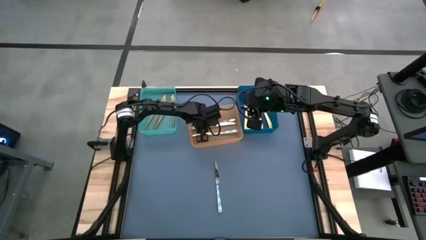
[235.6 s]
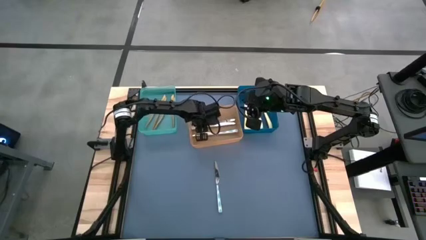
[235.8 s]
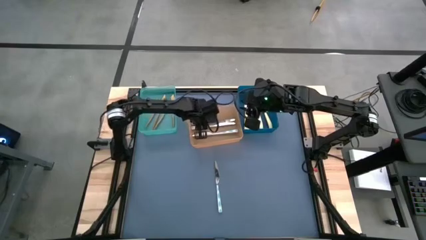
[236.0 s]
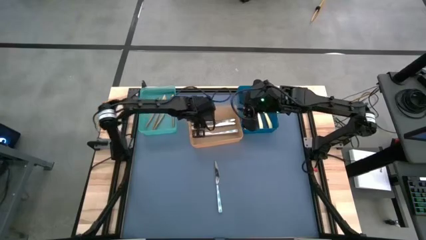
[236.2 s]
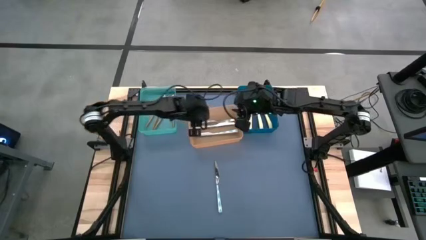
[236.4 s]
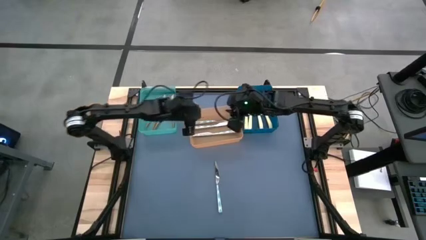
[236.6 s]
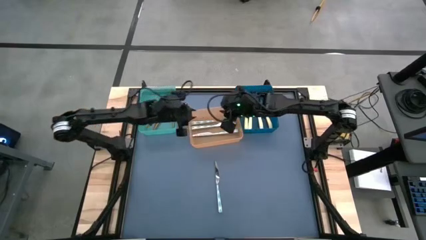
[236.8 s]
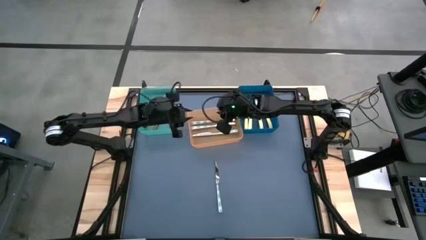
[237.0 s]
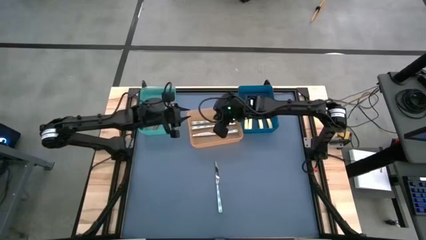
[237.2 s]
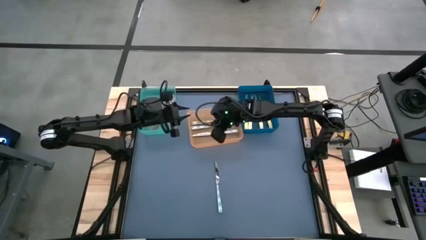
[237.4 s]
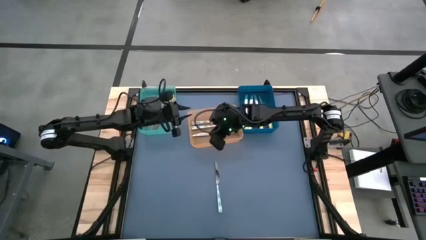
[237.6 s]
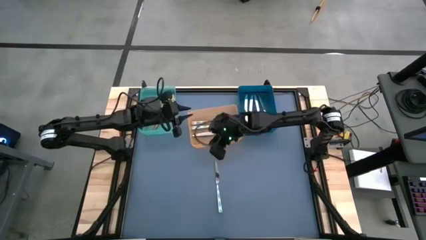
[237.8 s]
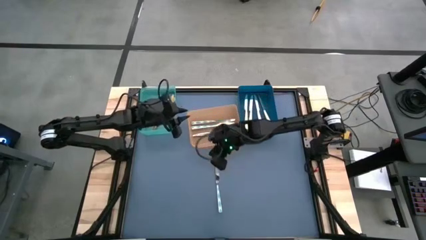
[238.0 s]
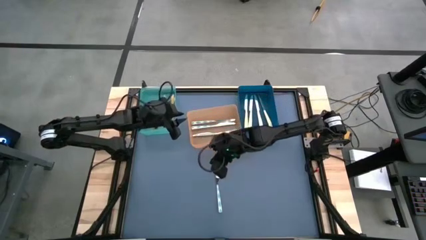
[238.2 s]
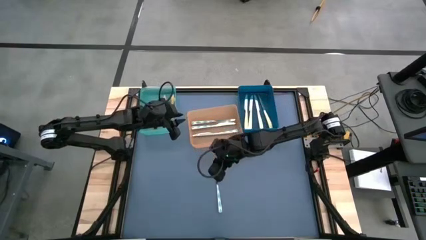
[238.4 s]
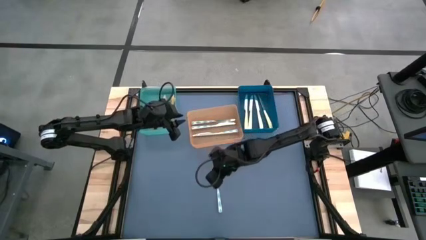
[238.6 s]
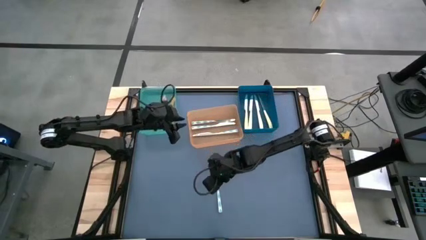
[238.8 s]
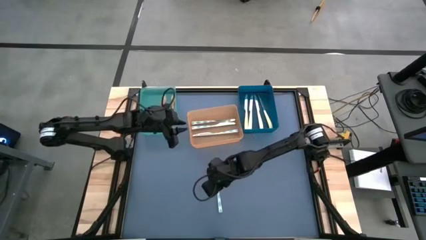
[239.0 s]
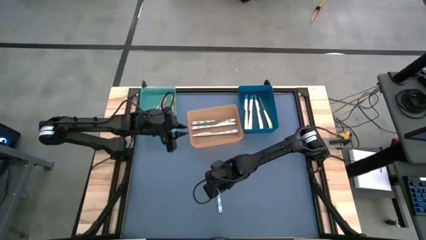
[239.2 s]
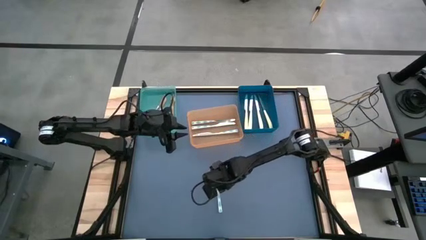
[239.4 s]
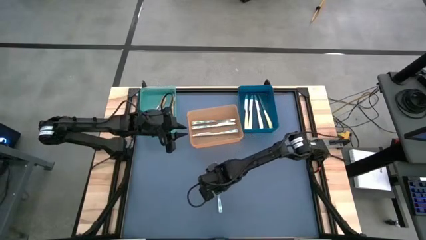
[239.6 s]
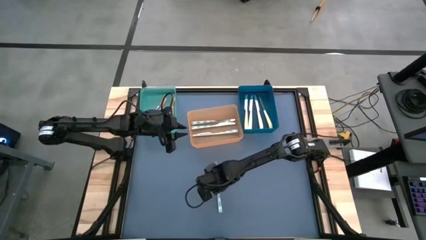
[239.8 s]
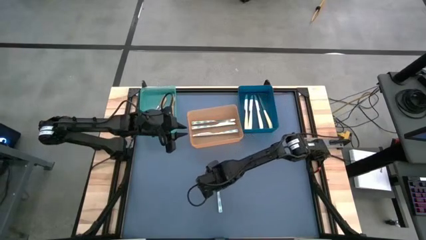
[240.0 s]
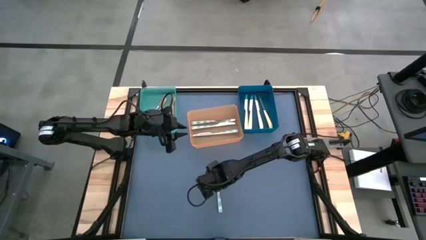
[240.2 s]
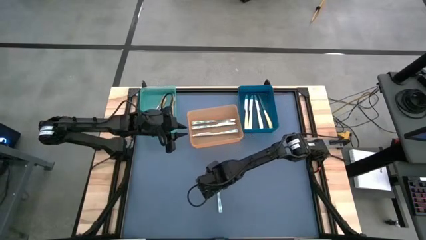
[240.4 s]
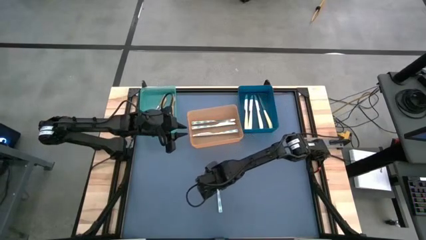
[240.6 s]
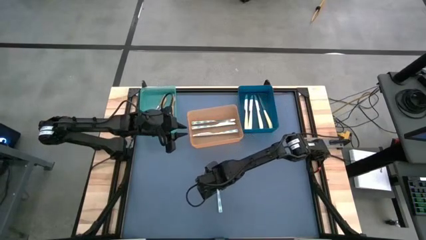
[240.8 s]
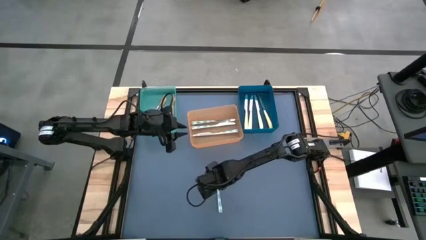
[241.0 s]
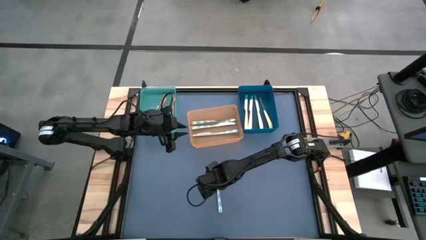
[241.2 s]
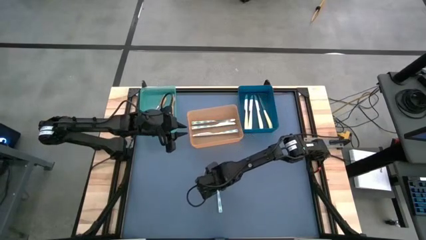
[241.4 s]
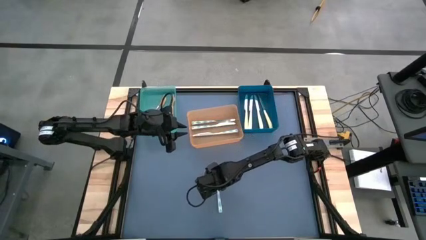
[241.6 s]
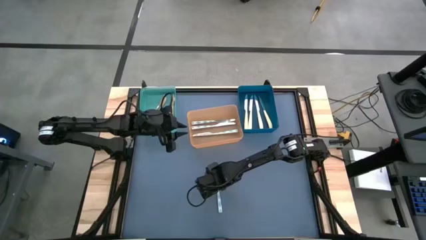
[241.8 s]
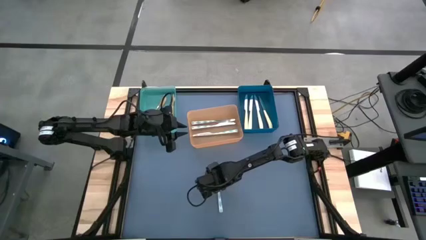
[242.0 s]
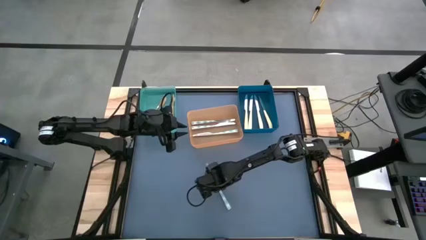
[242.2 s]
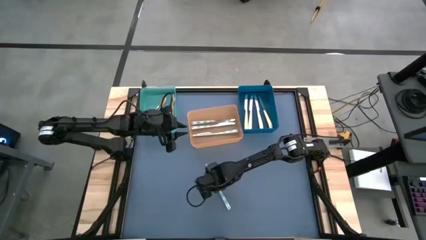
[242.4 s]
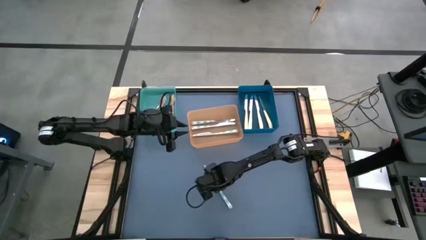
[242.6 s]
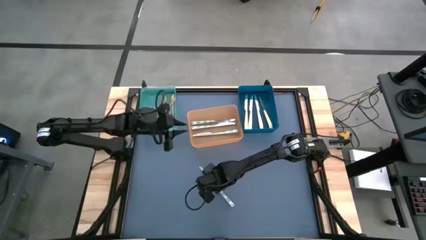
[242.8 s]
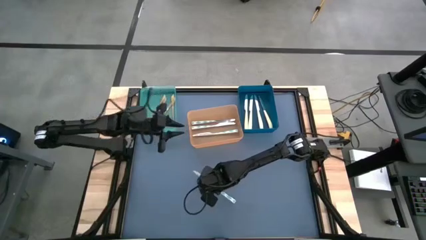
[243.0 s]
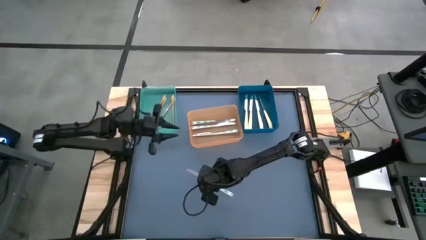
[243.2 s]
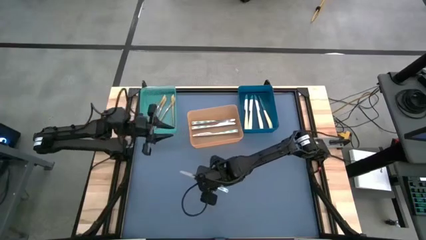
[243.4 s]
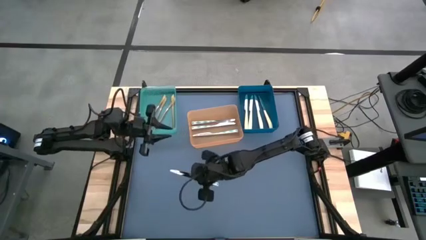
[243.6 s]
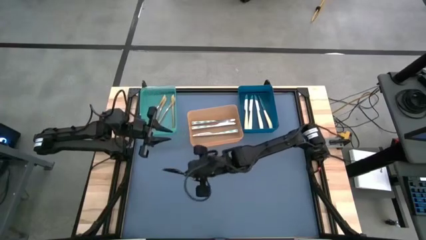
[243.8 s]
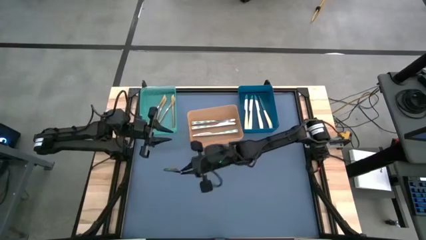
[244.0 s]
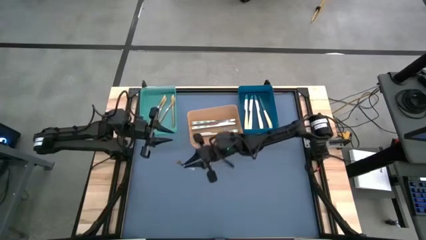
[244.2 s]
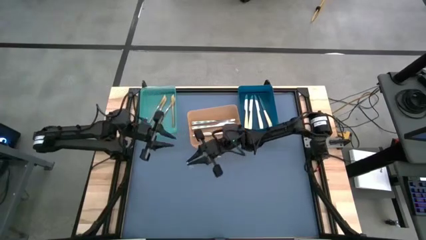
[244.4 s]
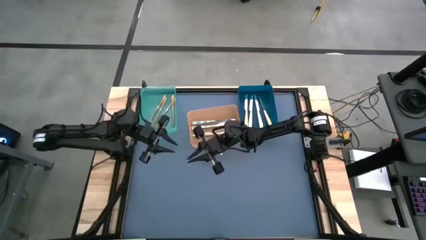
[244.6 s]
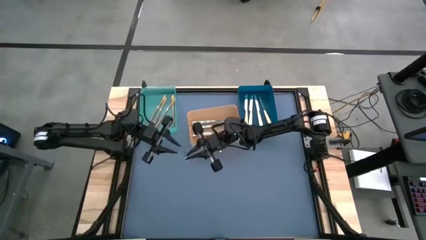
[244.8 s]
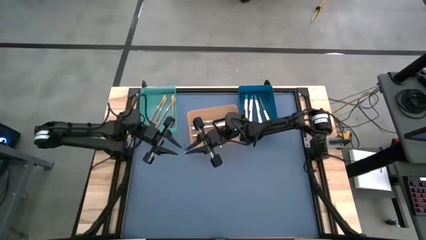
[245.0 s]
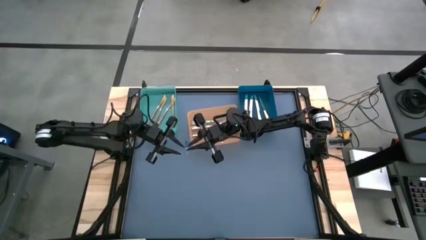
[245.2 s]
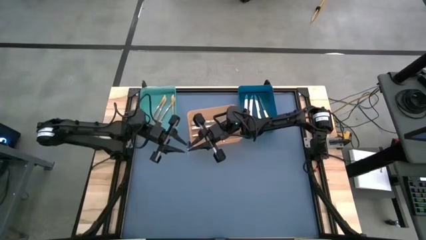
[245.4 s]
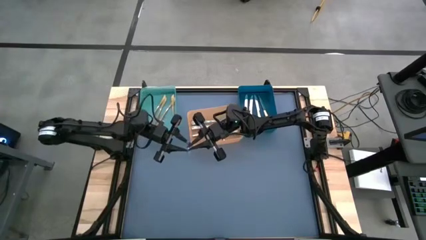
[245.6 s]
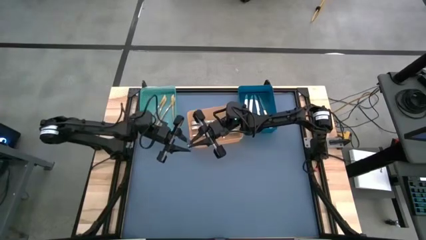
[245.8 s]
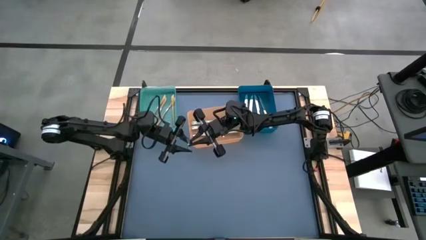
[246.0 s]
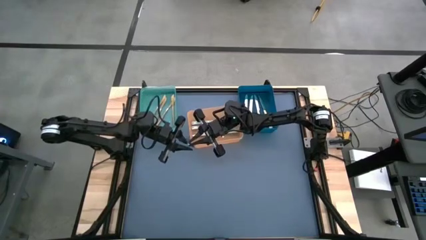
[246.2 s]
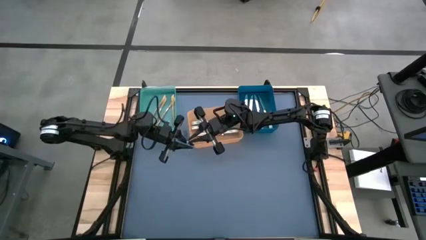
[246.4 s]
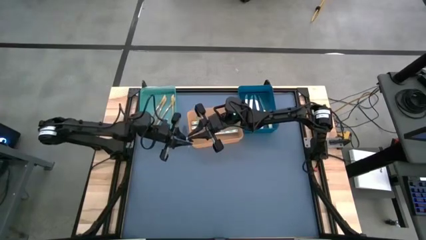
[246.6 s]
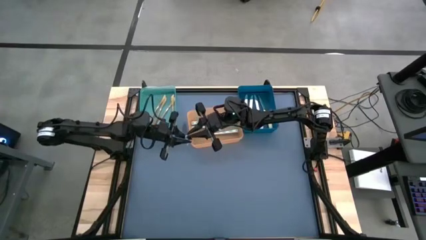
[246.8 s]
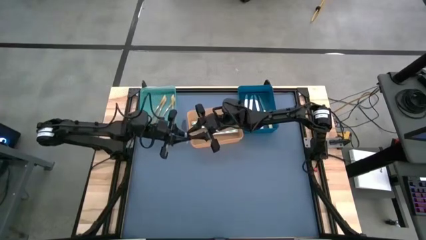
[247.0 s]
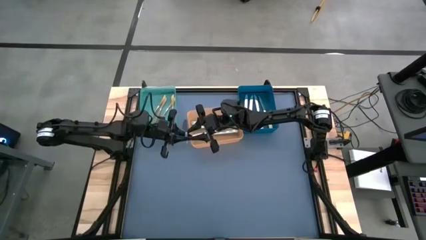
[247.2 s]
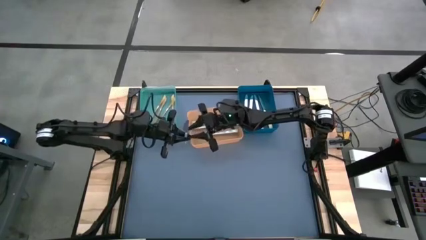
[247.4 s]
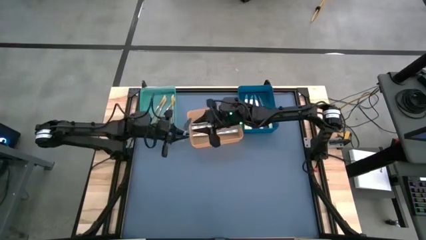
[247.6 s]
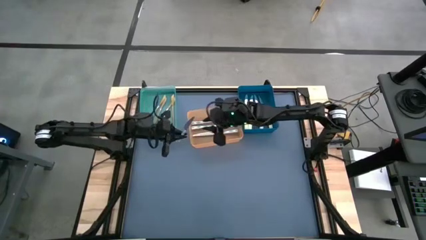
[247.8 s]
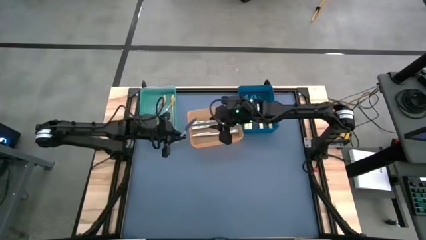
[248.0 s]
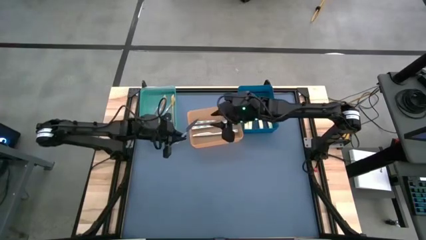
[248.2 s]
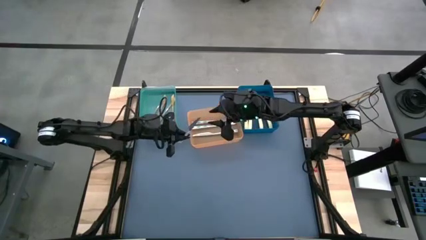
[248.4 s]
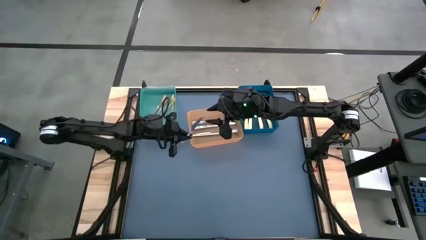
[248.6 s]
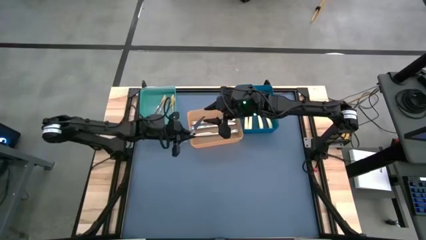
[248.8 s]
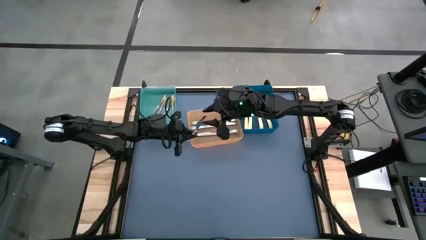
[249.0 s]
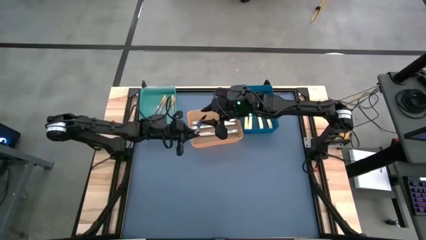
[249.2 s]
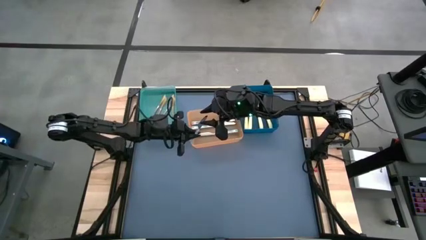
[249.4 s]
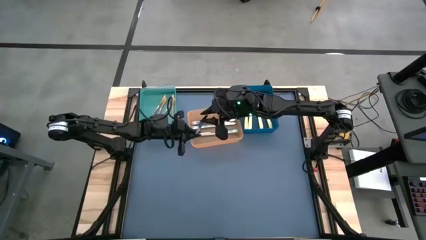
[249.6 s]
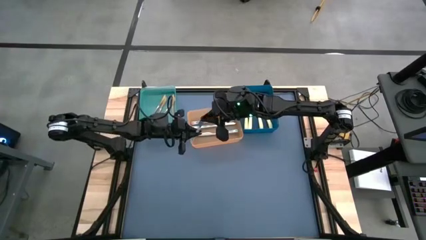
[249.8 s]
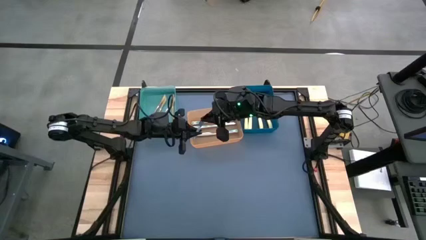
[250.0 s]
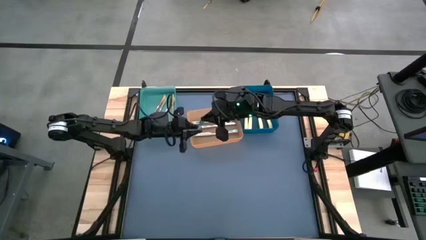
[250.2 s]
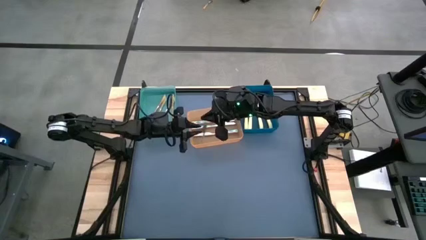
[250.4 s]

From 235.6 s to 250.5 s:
Task: Sort silverware by color (type)
Put the white knife in the orange bin

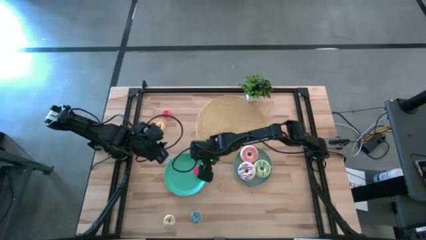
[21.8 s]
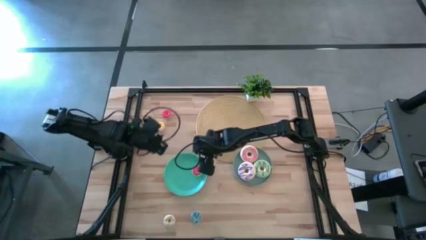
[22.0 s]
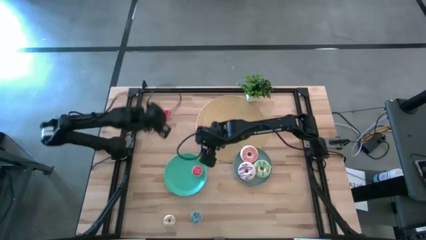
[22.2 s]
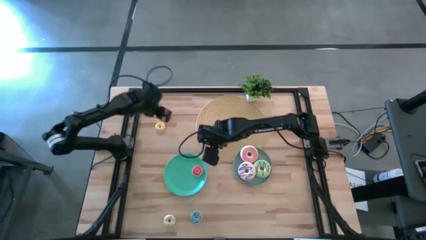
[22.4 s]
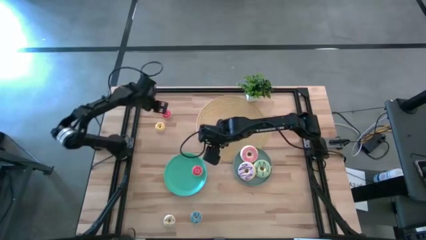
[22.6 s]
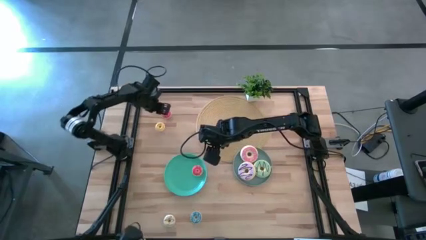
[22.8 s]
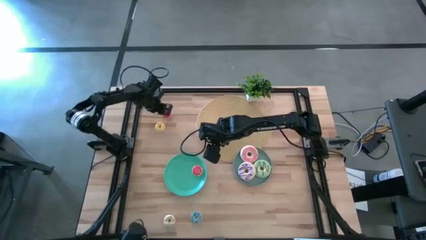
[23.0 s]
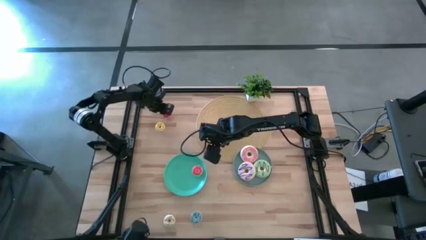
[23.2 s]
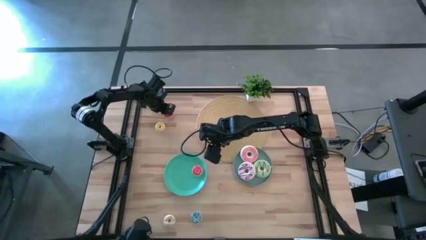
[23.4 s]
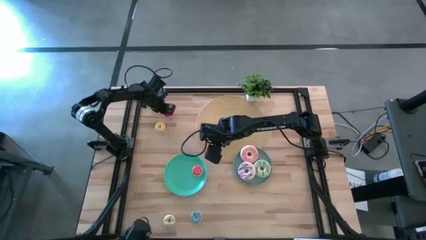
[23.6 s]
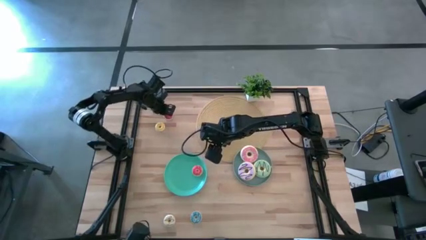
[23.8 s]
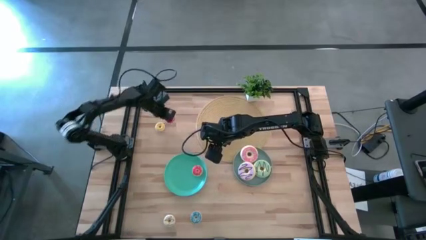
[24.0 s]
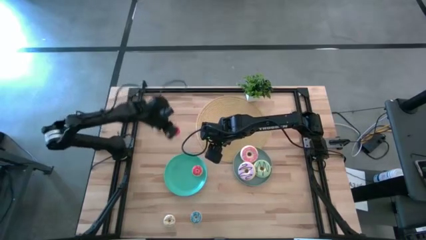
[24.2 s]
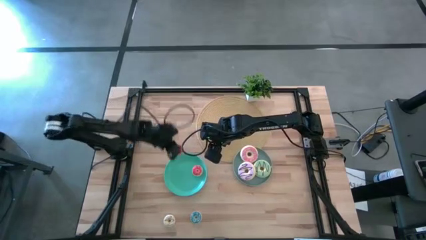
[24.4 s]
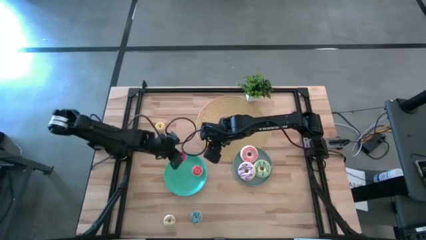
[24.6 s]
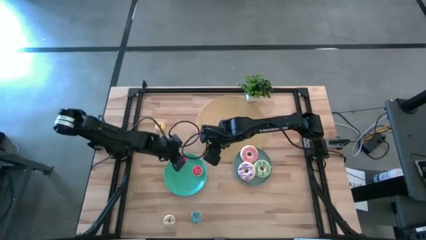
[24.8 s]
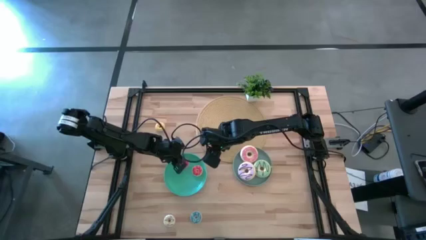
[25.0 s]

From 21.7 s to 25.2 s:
Task: Pick & Place donuts
Put the small red donut on the light green plate
